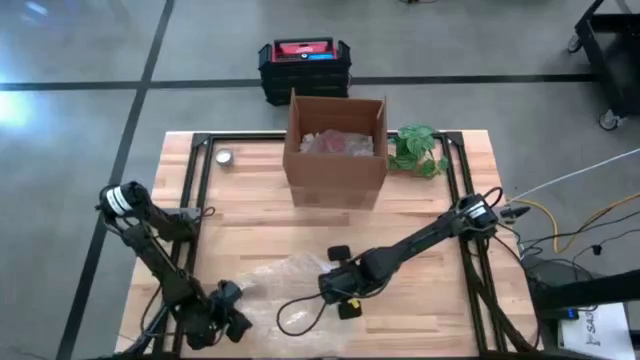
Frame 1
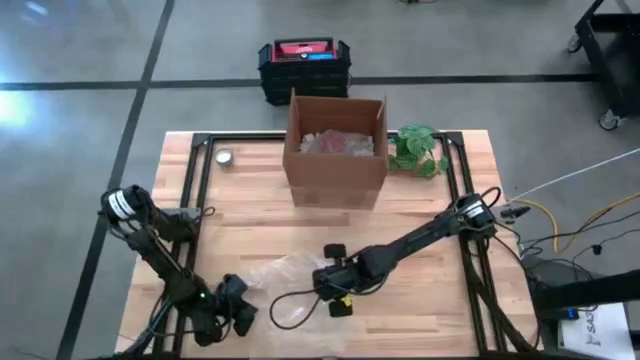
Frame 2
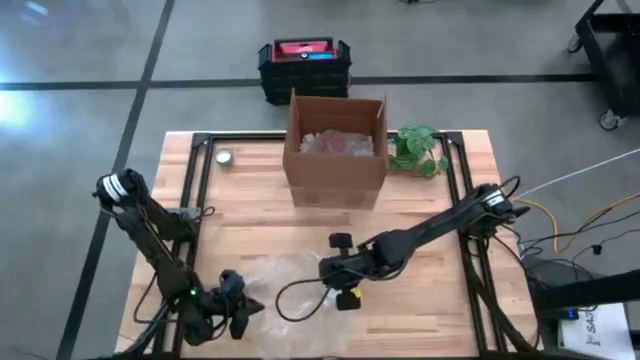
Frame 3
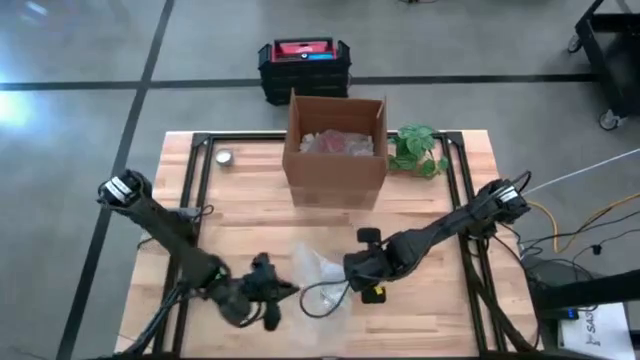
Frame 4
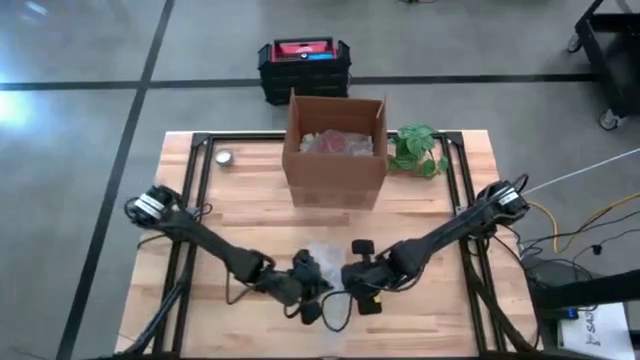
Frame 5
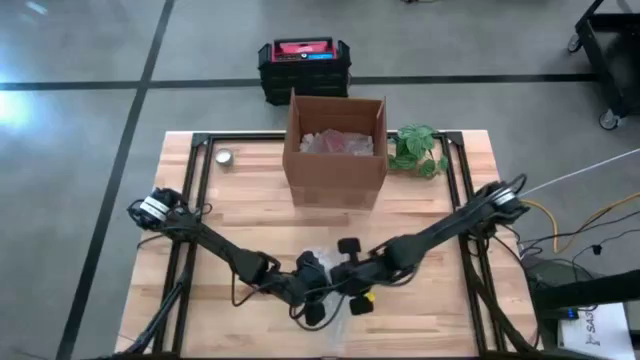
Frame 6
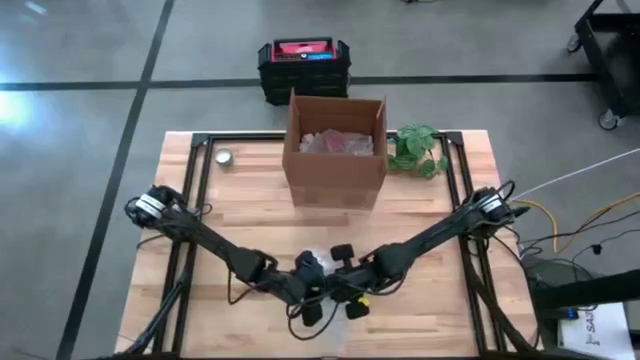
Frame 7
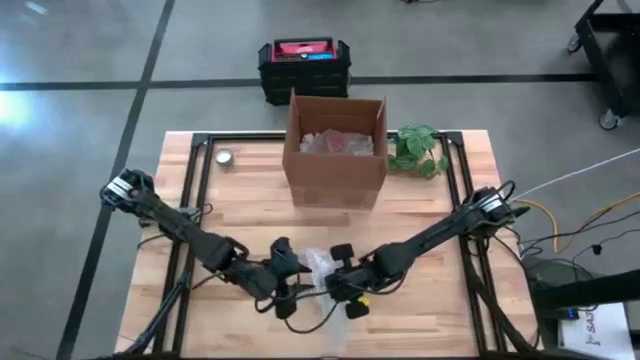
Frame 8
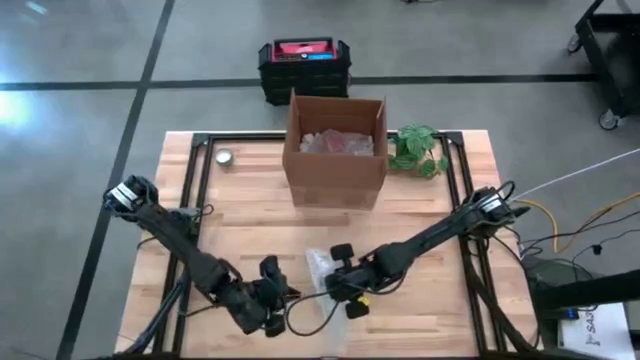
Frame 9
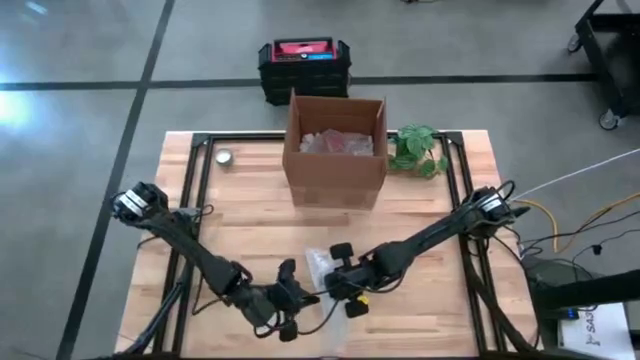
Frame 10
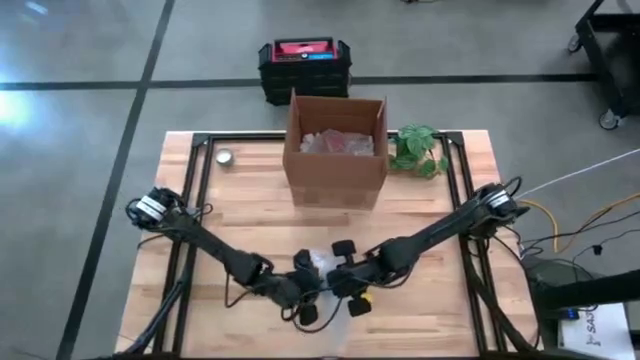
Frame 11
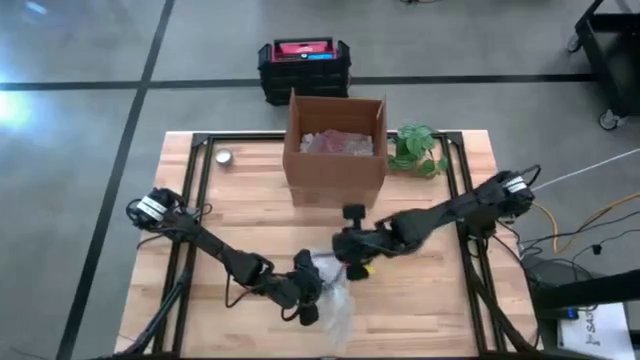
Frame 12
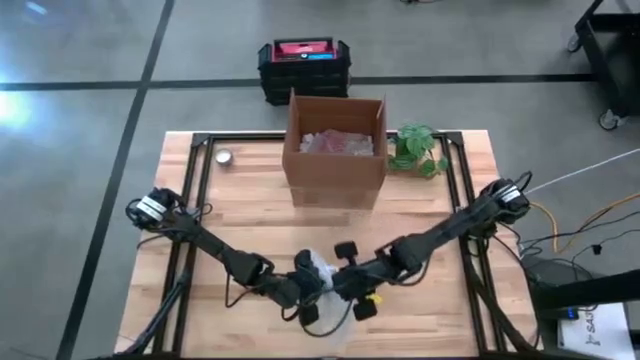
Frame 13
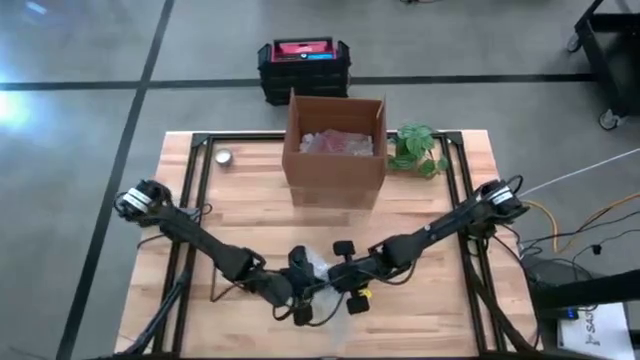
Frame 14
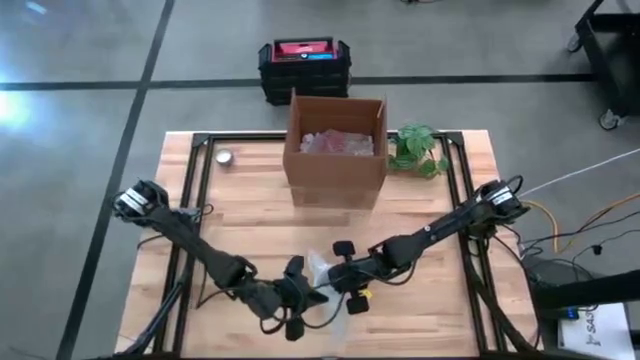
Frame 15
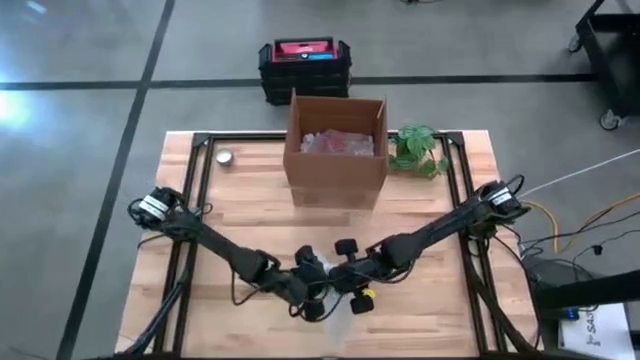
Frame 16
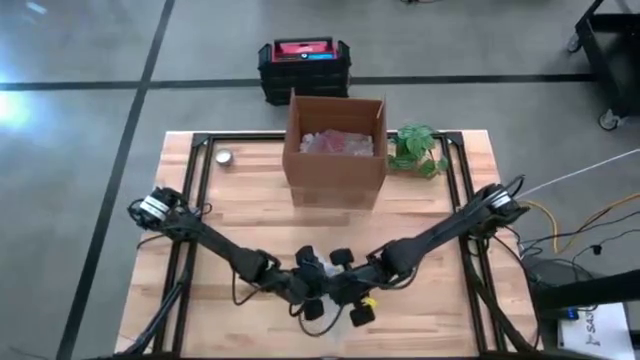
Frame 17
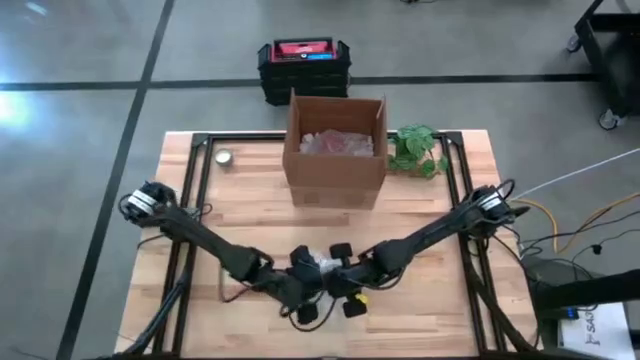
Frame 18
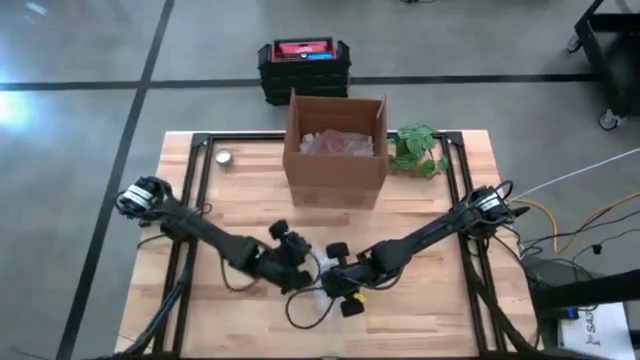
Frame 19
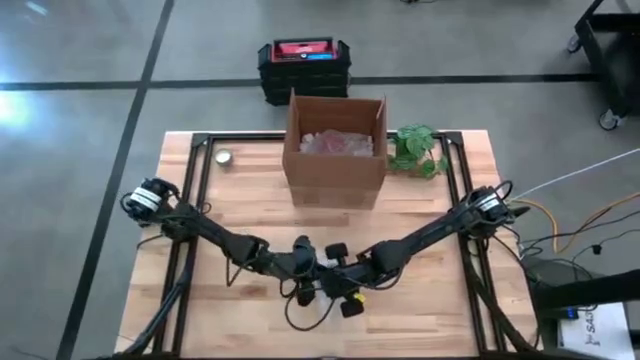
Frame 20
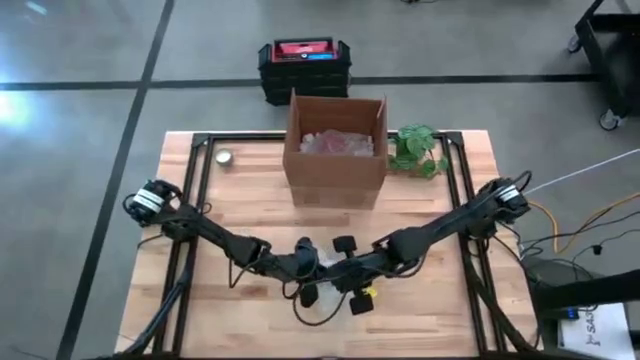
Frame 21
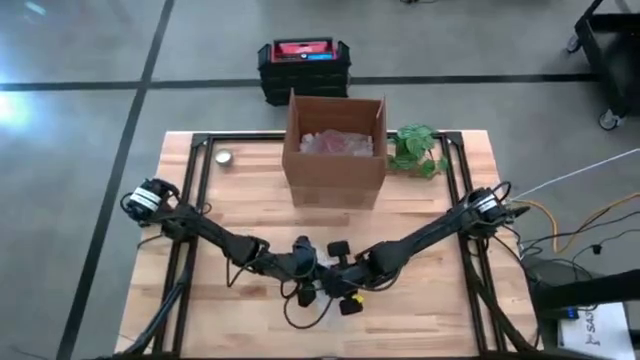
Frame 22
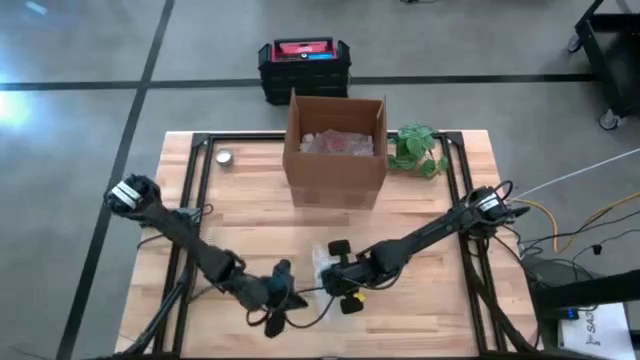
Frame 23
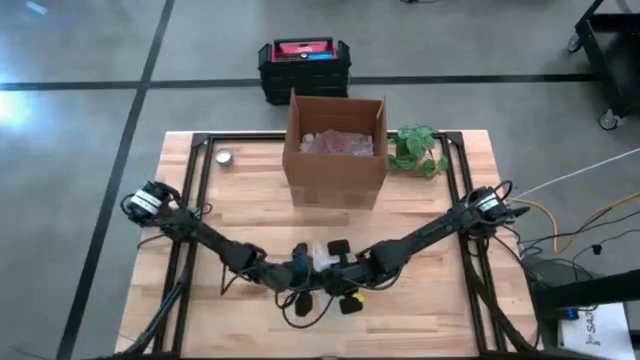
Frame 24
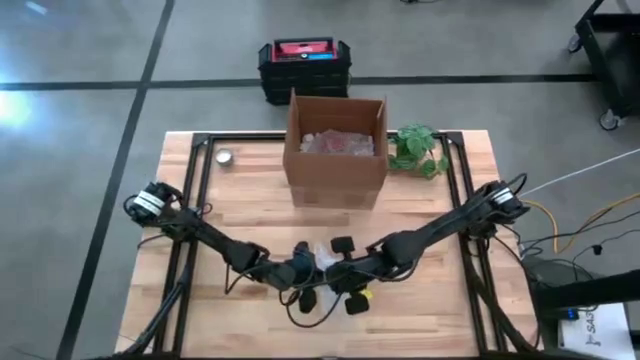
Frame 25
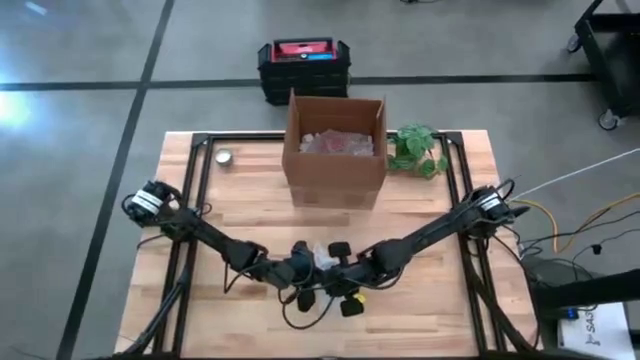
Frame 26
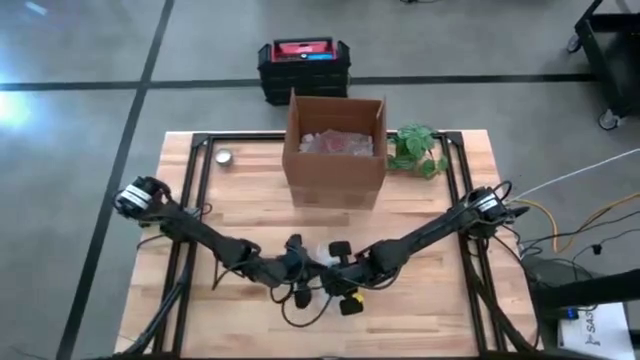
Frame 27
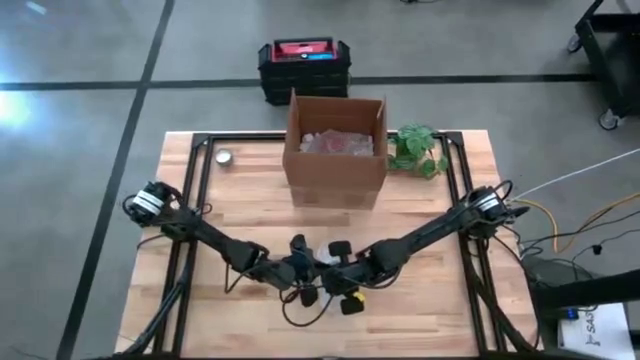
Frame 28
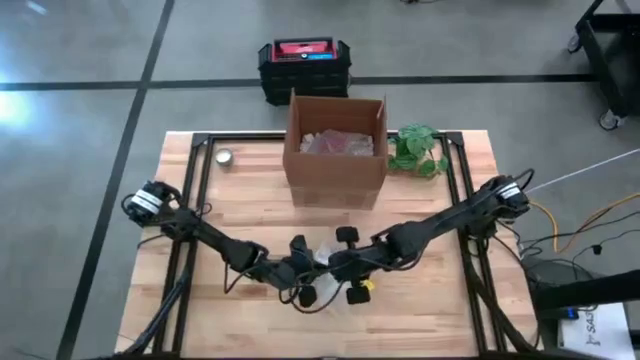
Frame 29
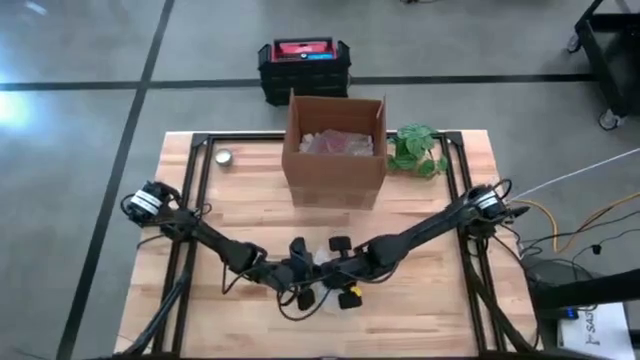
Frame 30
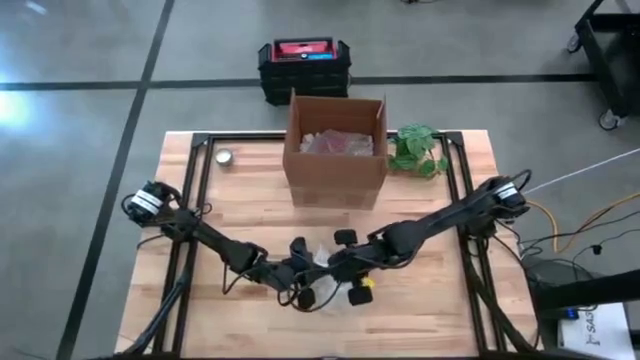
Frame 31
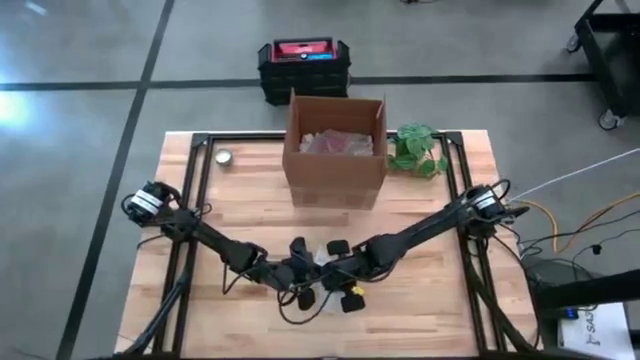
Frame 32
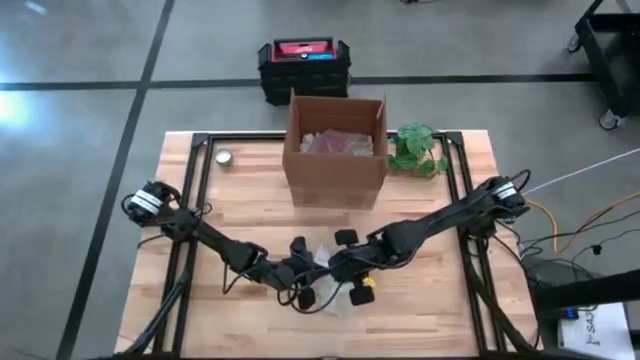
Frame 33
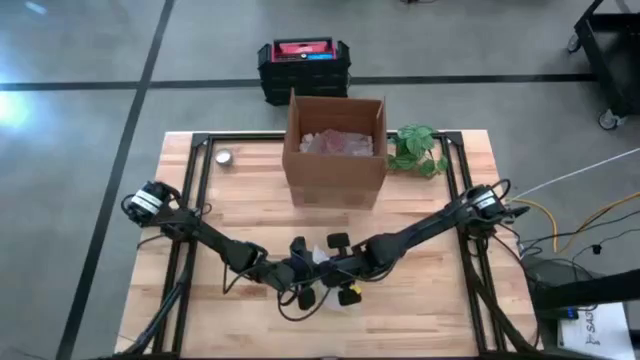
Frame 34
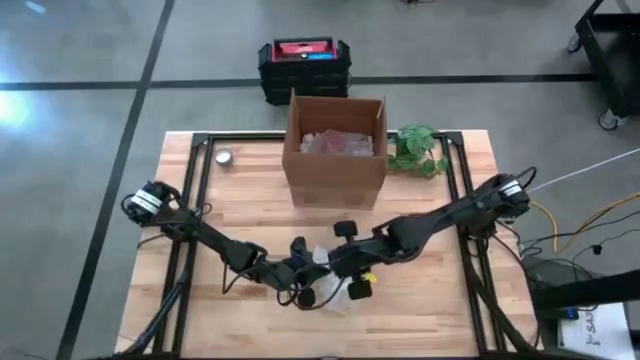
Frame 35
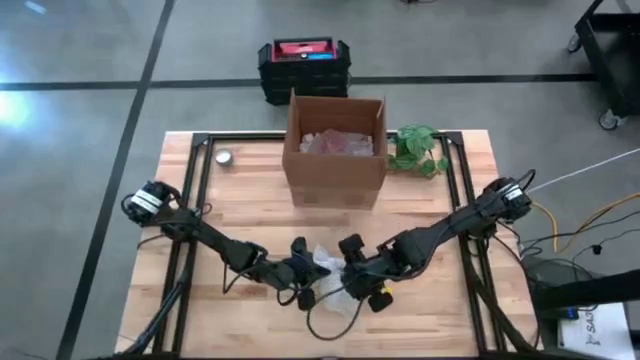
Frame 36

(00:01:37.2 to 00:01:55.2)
Task: wrap mug
Wrap the white mug with the transparent bubble wrap

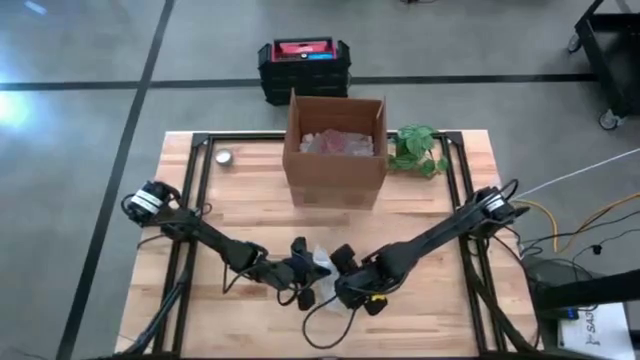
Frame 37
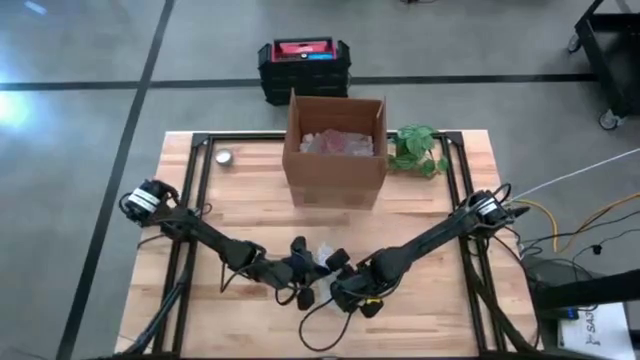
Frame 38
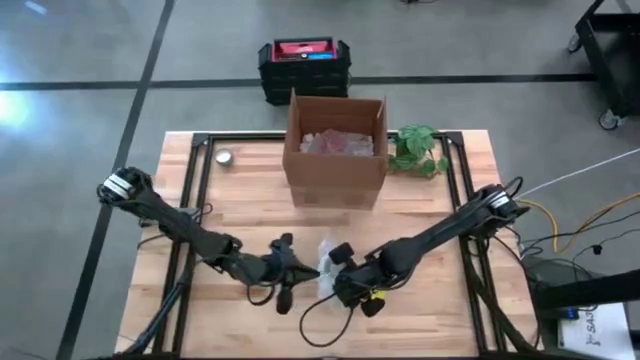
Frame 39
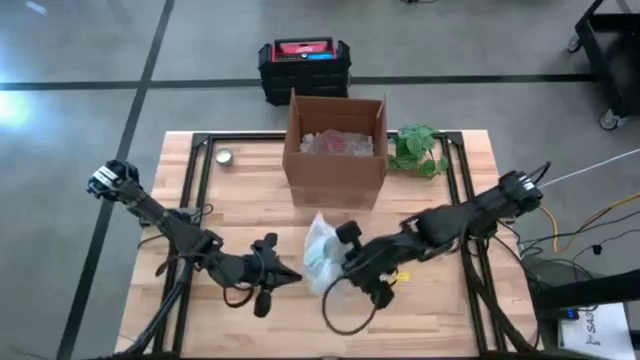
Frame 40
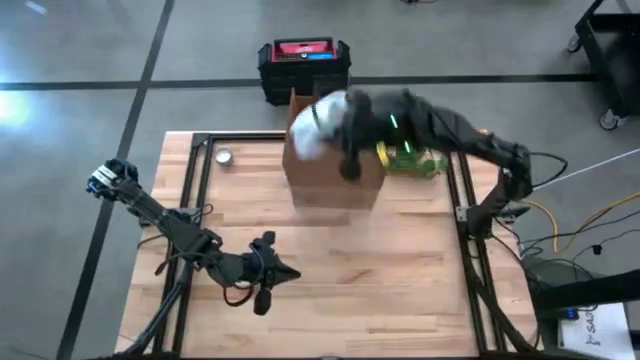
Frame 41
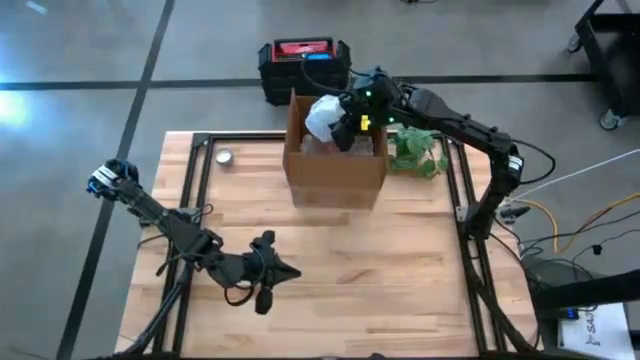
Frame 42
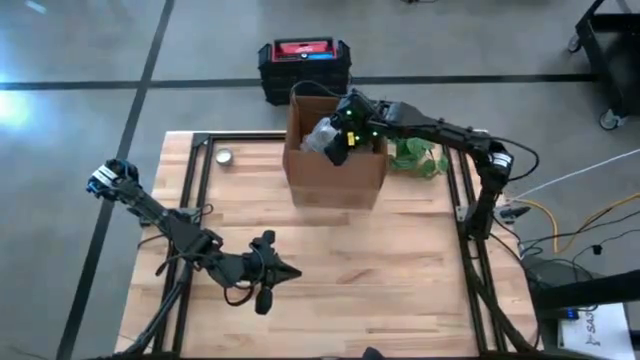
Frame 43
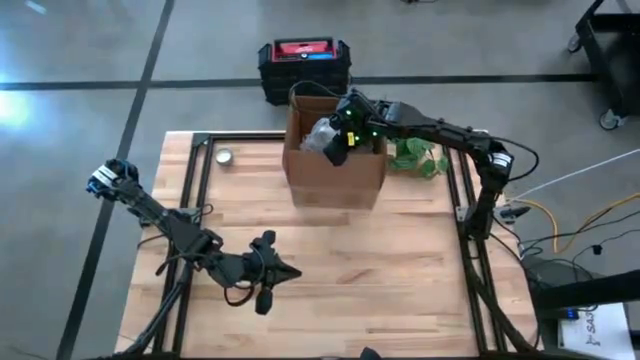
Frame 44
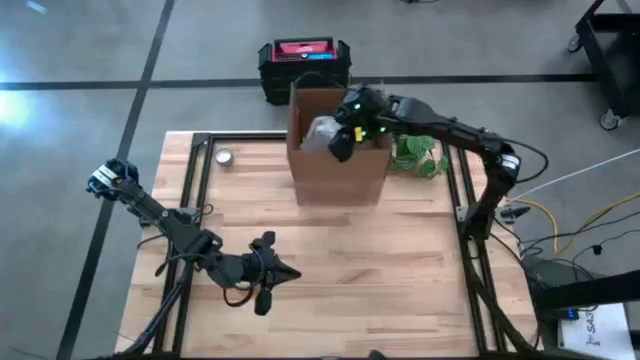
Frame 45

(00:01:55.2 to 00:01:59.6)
Put the wrapped white mug into the brown cardboard box
